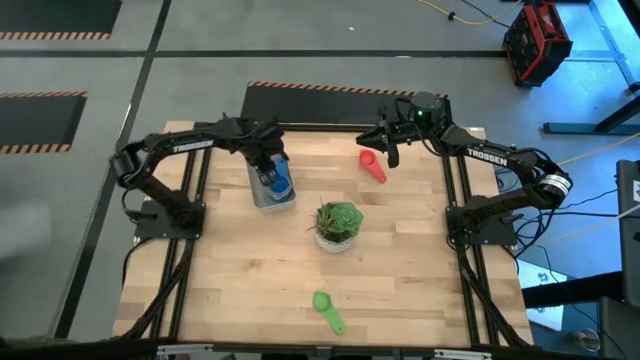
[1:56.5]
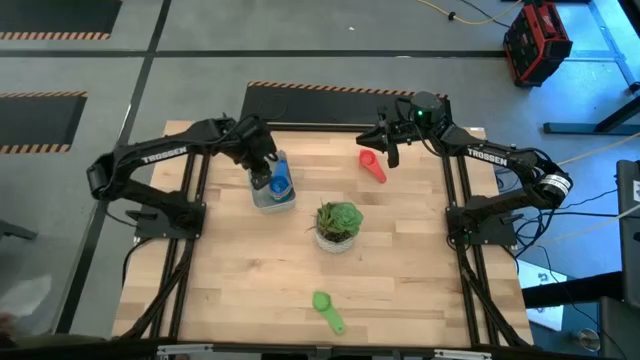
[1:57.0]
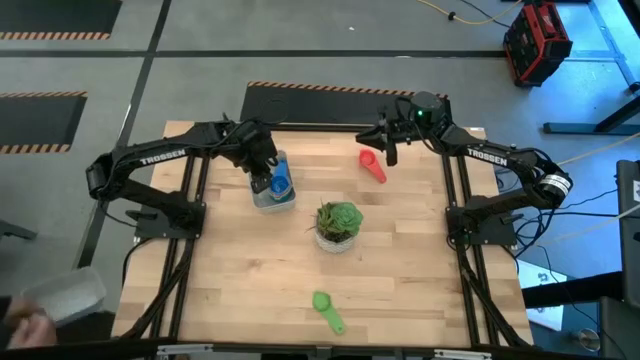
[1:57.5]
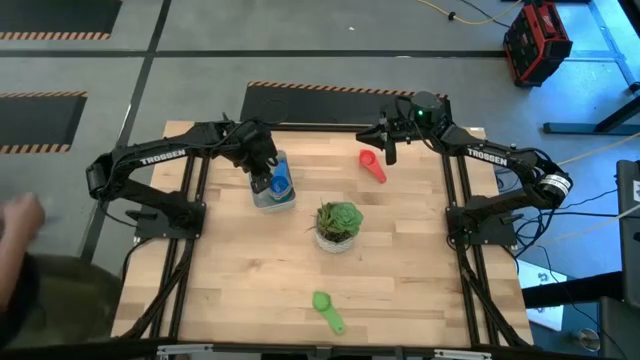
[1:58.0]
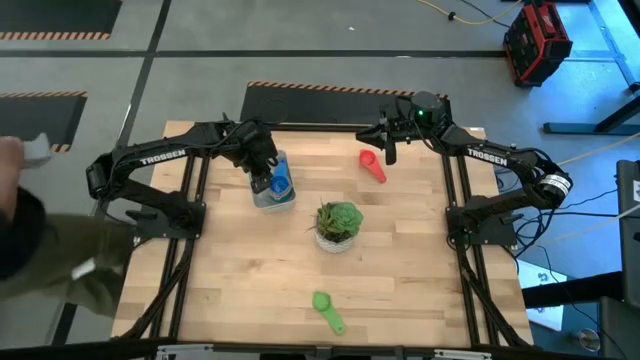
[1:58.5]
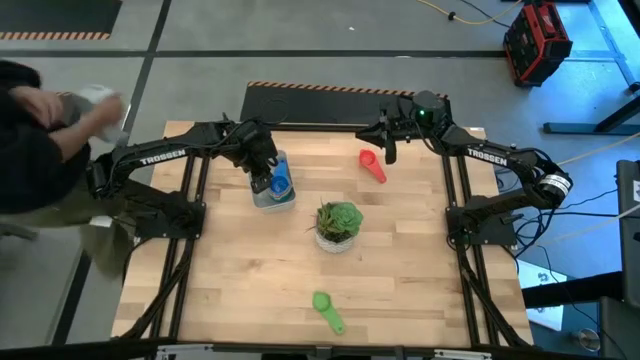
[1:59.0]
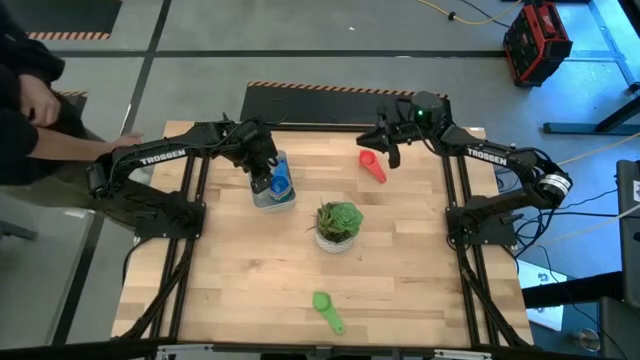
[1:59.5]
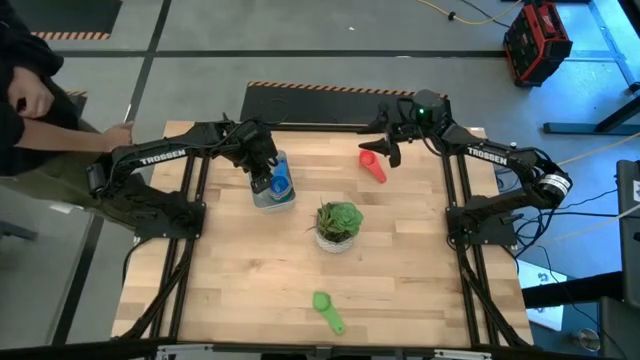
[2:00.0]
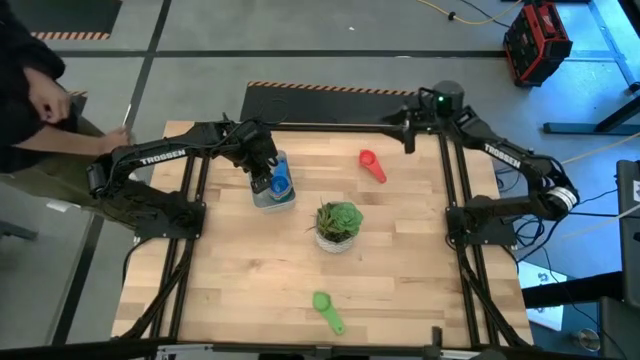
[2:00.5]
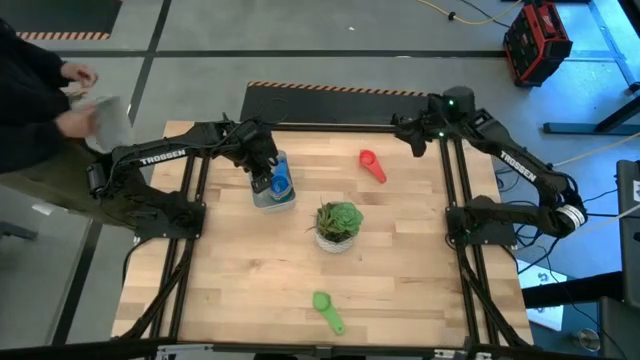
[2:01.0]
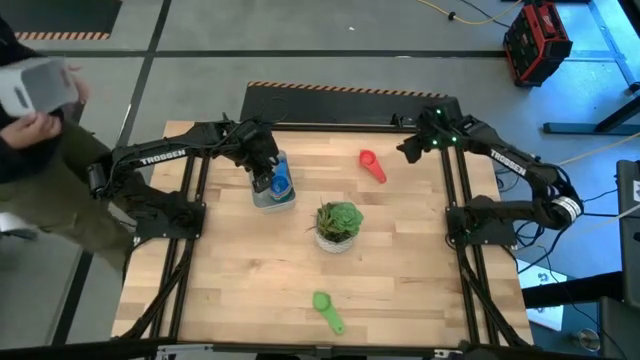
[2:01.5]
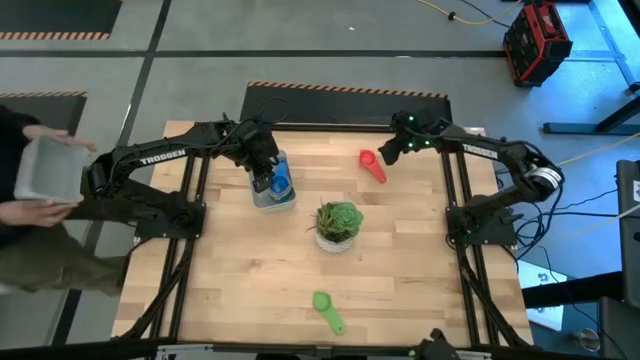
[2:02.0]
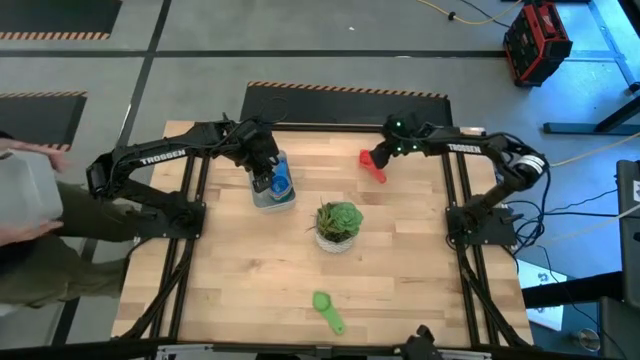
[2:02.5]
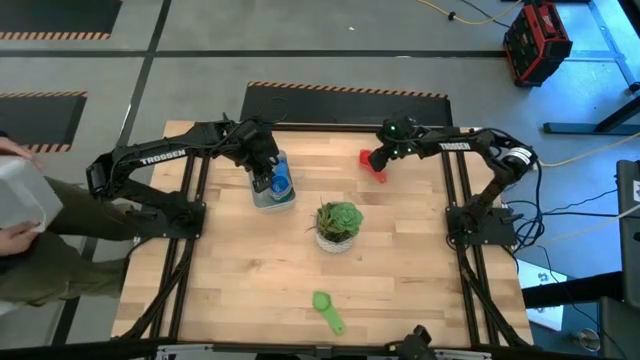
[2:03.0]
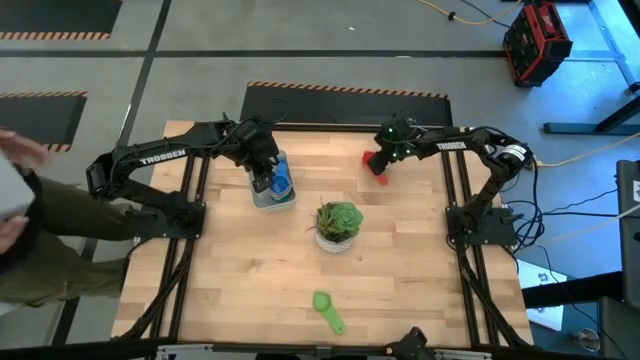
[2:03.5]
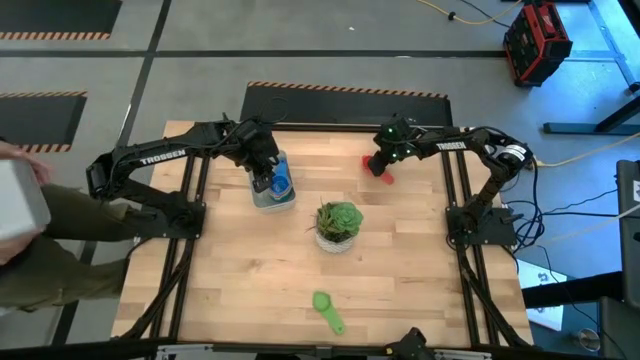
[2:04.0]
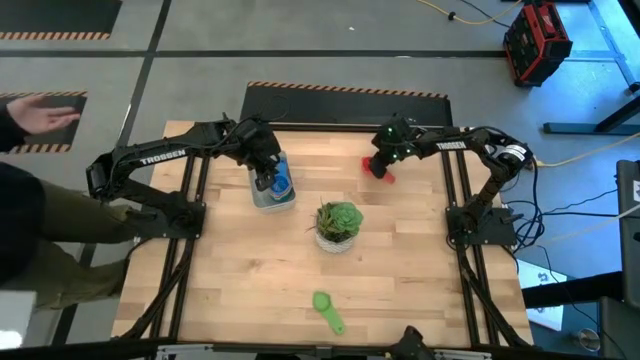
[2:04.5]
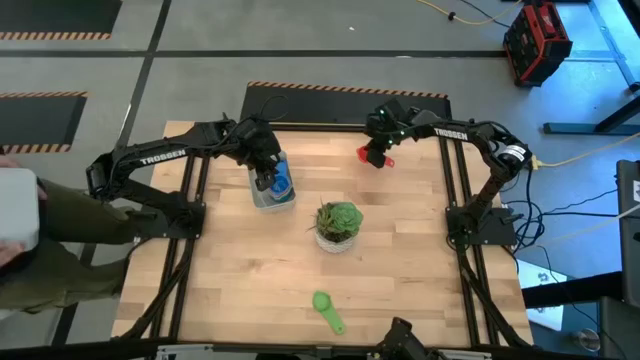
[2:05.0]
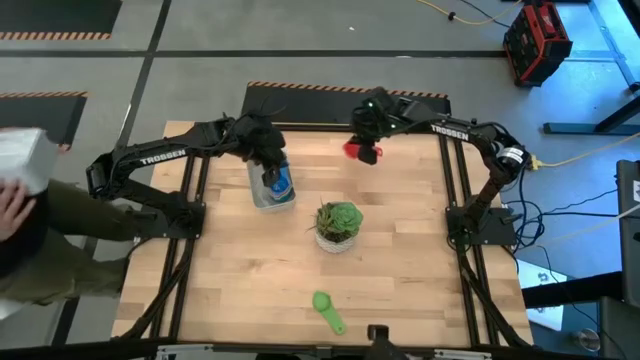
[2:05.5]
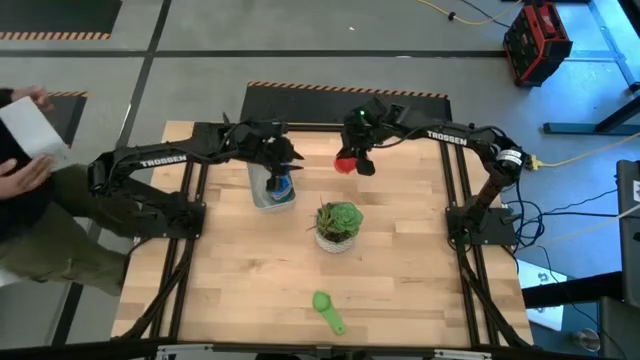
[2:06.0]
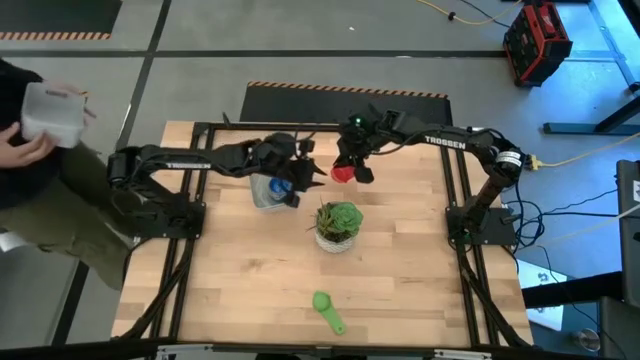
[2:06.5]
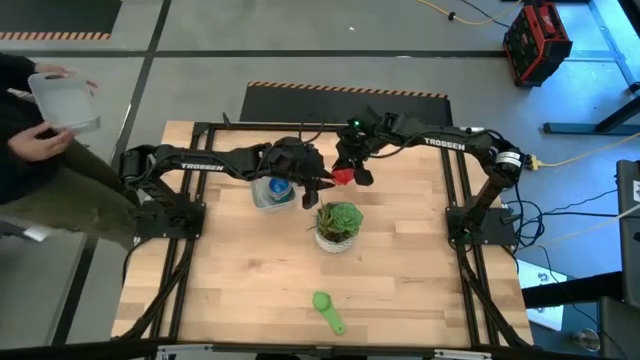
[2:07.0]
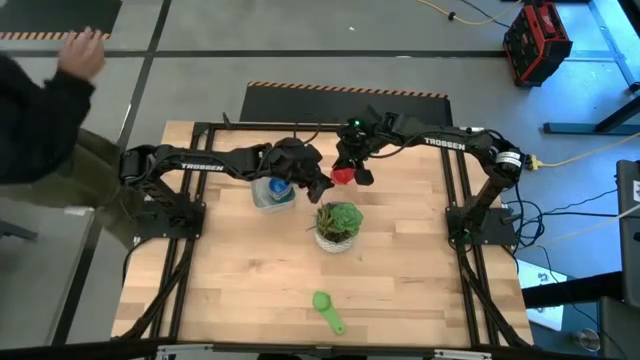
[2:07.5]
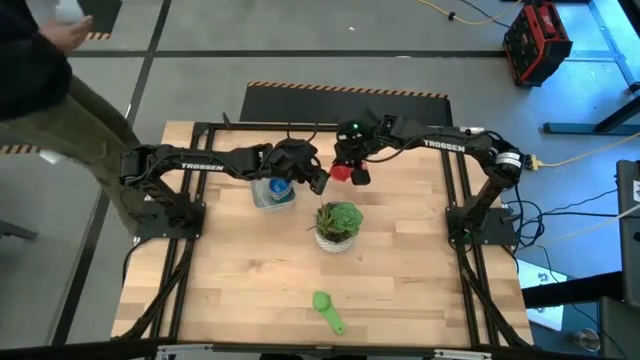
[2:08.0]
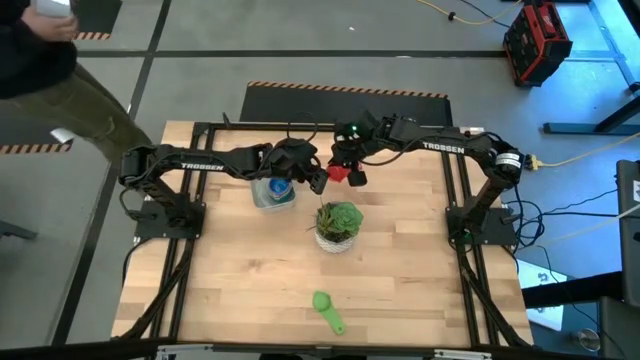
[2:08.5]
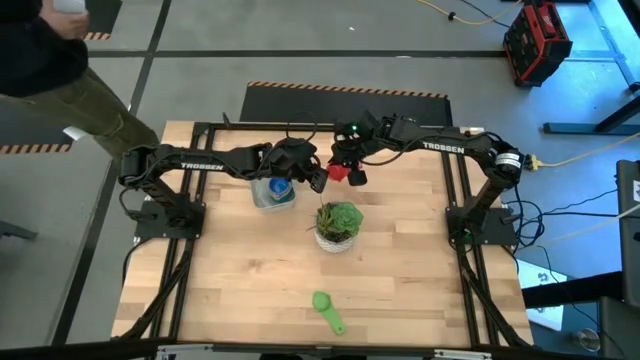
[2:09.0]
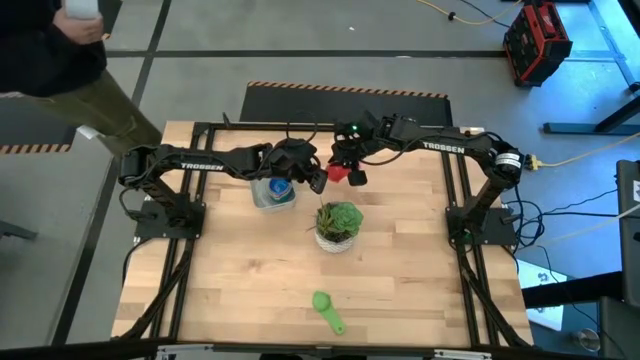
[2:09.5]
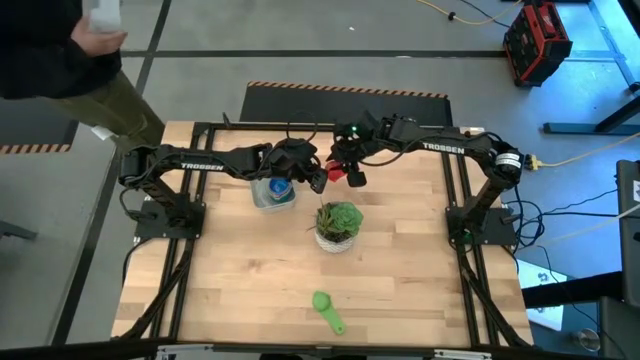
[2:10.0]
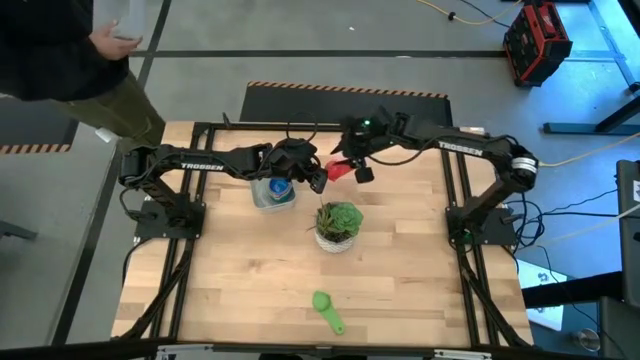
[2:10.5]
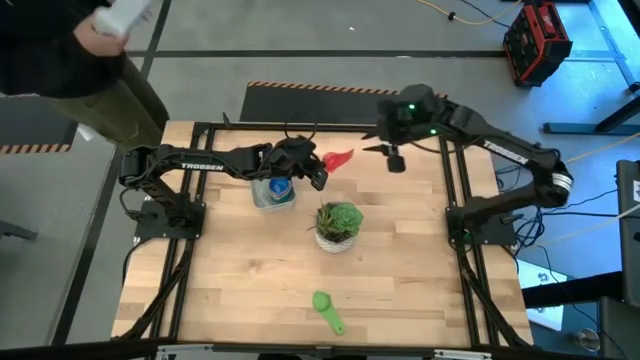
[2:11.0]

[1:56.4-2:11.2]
Task: Nest measuring cups in basket
Stack the red measuring cup on top of the blue measuring cup in the gray bin

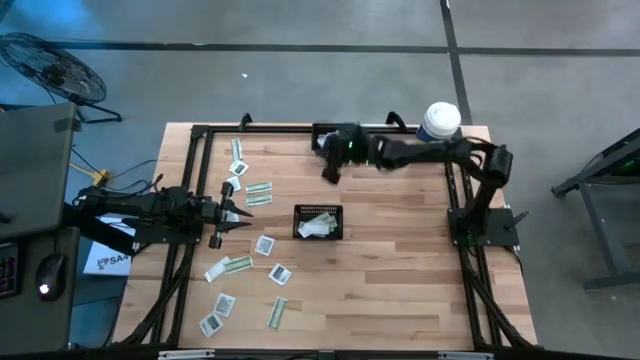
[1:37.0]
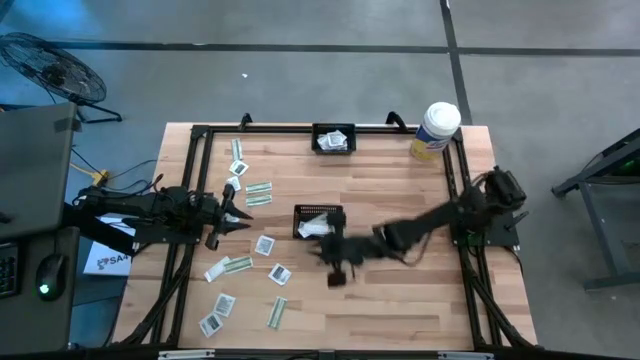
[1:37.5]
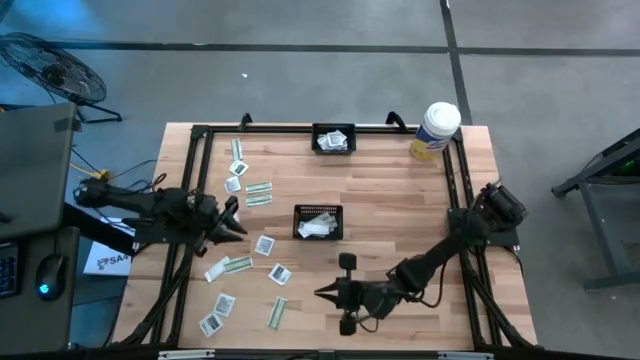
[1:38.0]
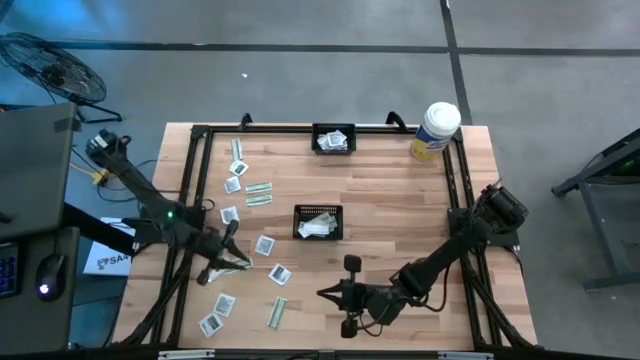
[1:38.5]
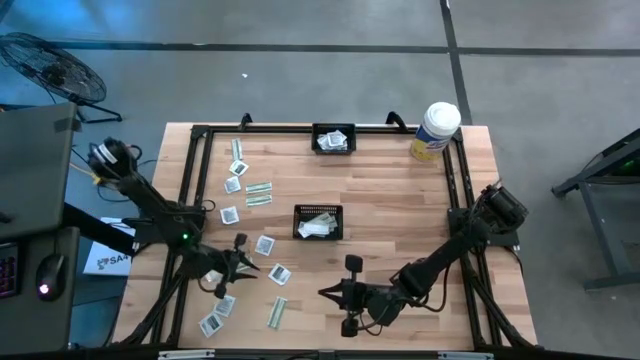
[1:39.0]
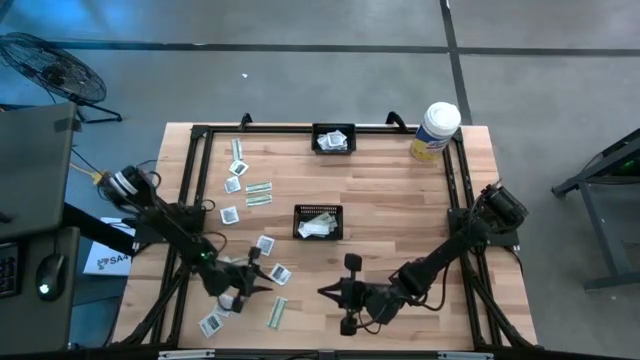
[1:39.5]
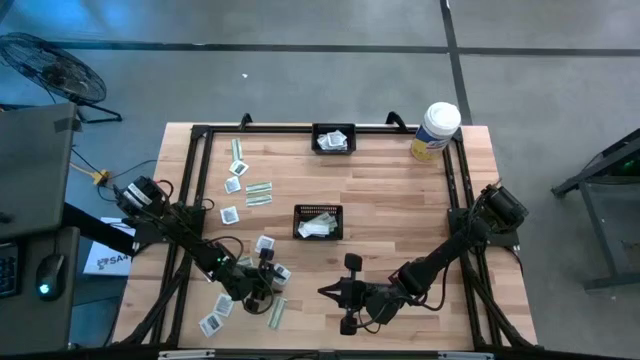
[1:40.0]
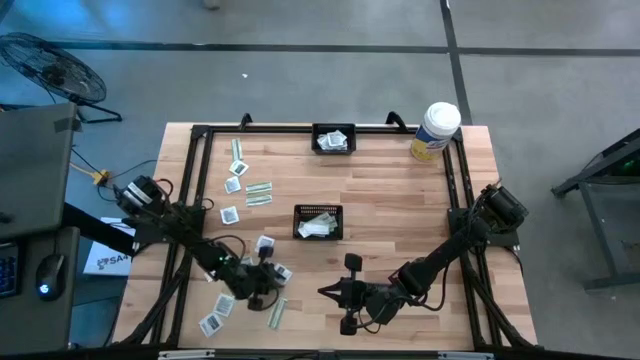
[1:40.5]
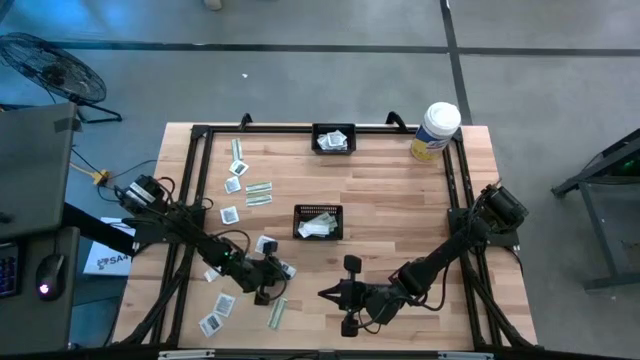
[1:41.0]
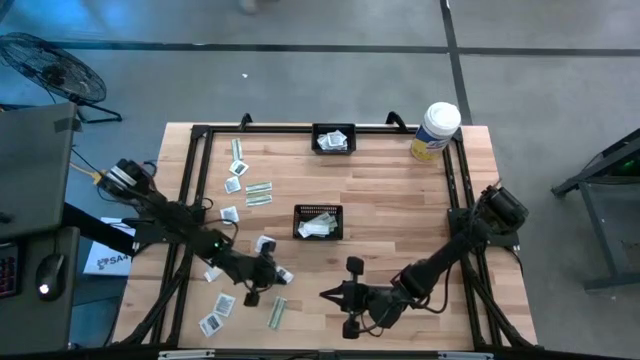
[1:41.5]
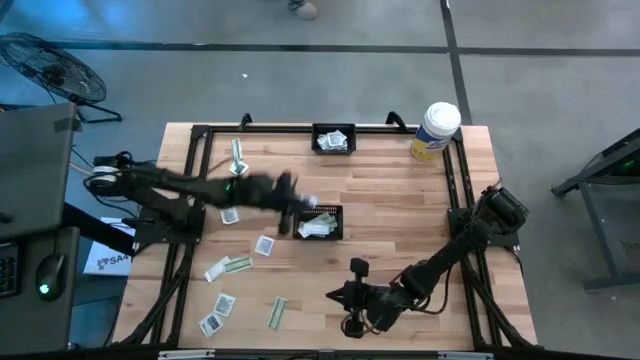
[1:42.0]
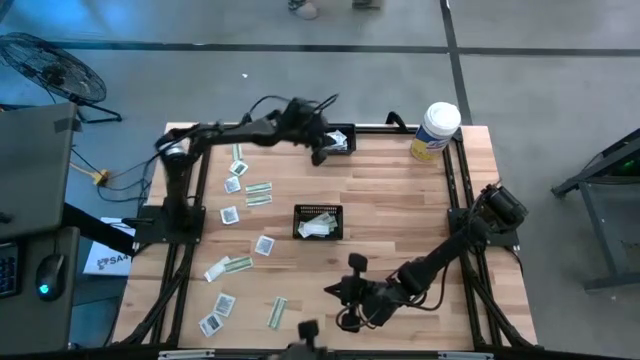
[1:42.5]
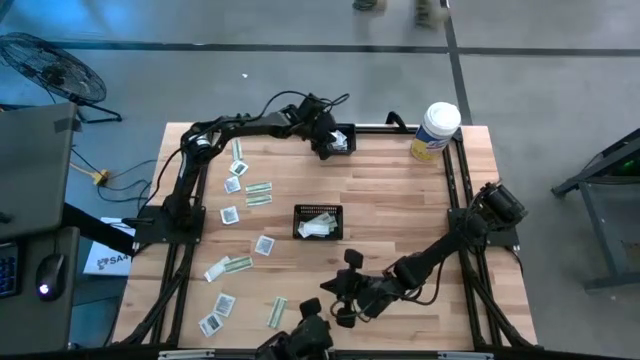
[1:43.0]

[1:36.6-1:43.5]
Task: Pick & Place First Aid Supplies
Put the towelette pack into the top black basket
